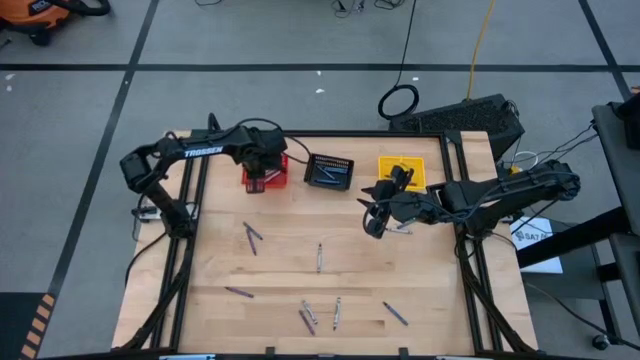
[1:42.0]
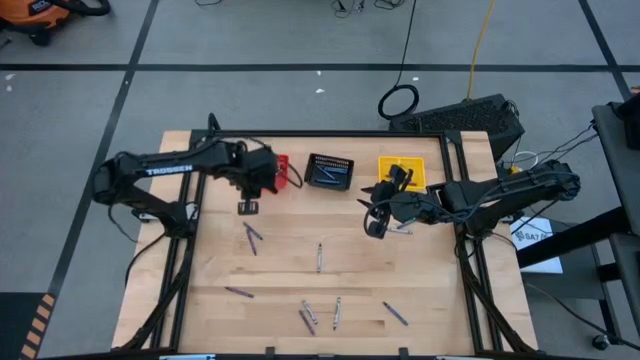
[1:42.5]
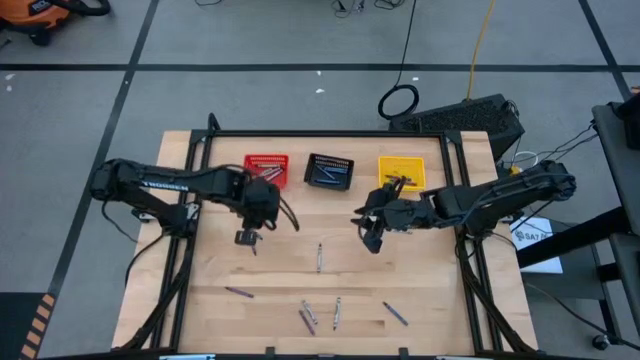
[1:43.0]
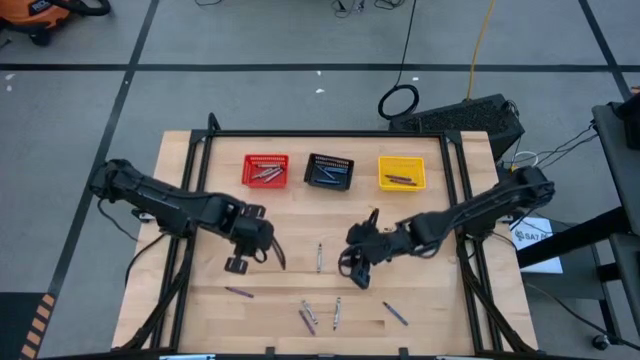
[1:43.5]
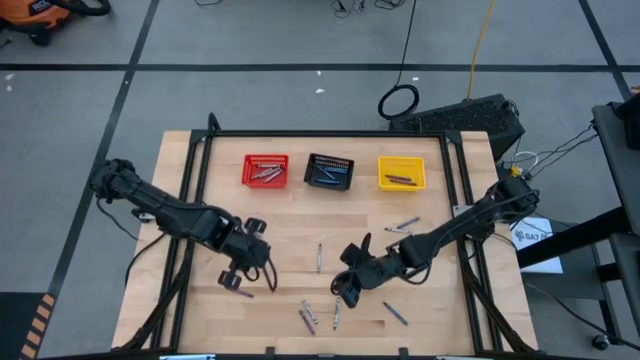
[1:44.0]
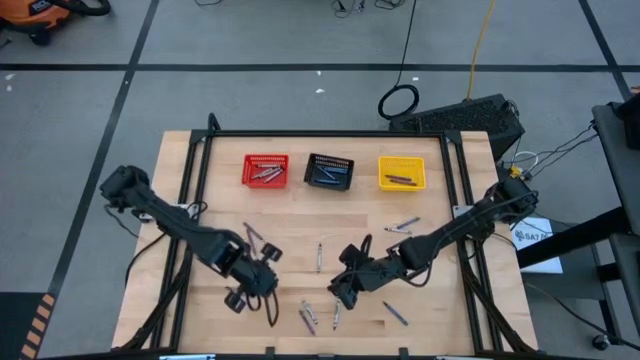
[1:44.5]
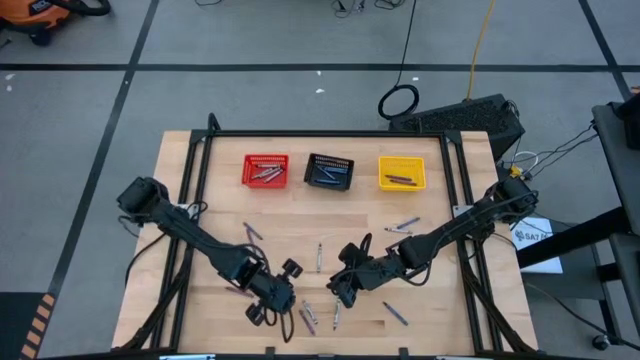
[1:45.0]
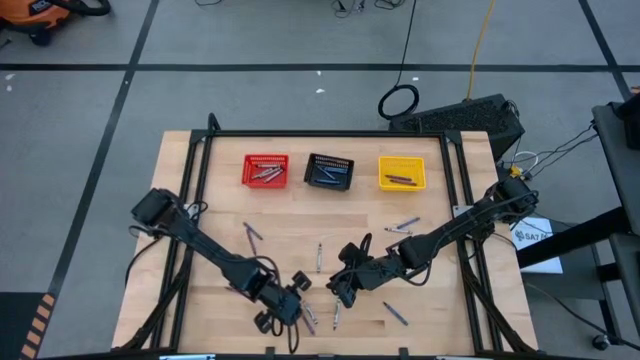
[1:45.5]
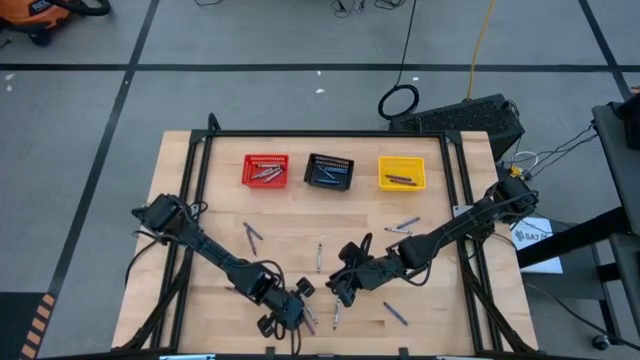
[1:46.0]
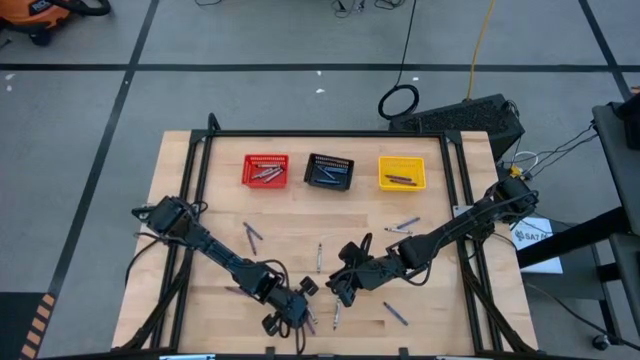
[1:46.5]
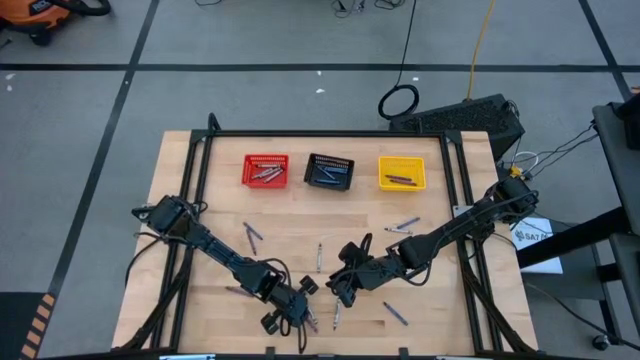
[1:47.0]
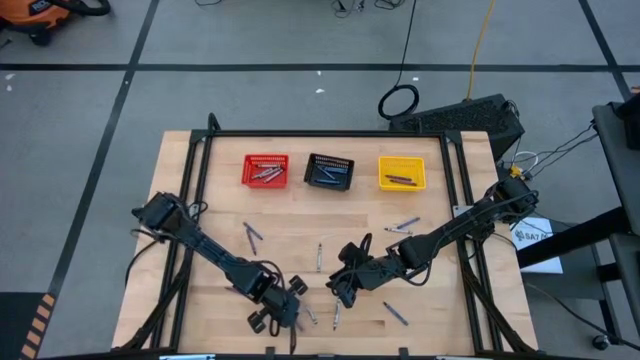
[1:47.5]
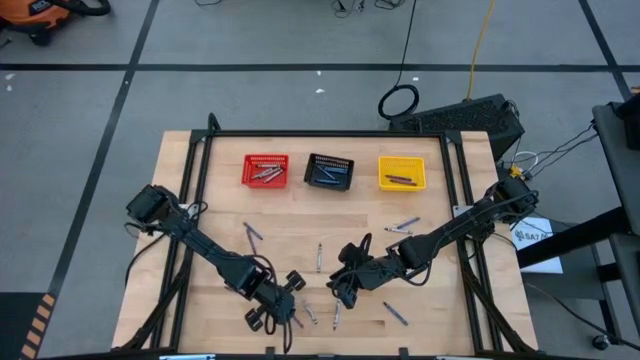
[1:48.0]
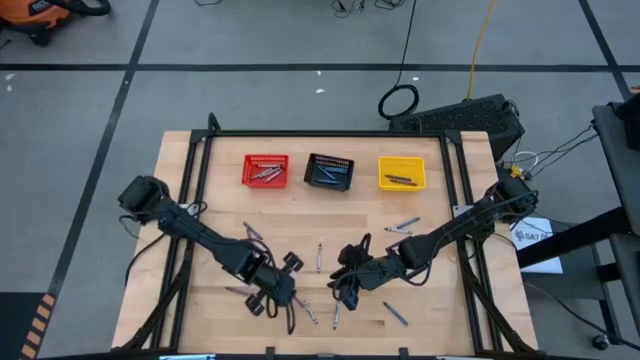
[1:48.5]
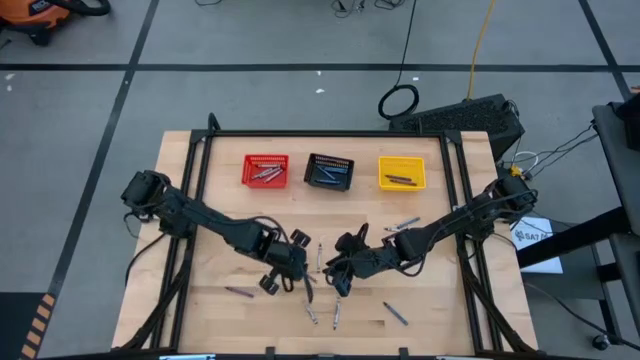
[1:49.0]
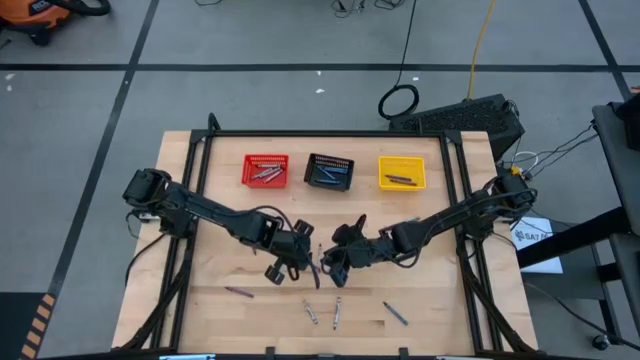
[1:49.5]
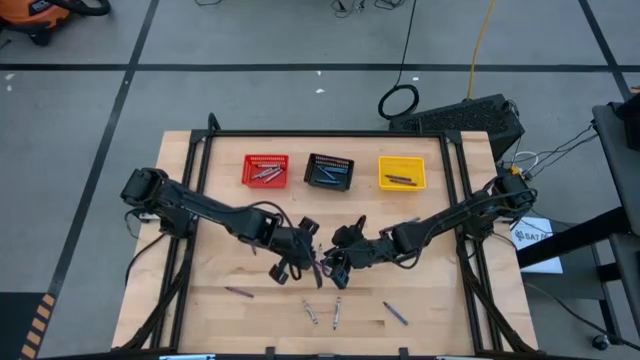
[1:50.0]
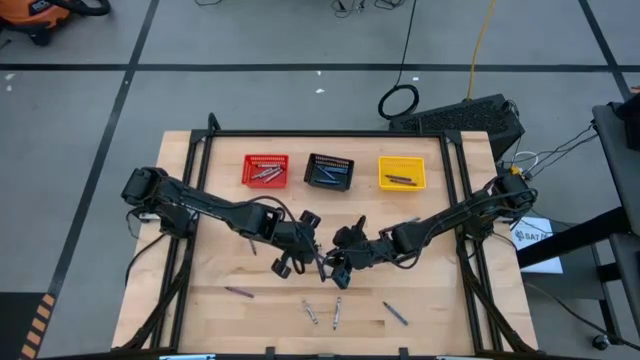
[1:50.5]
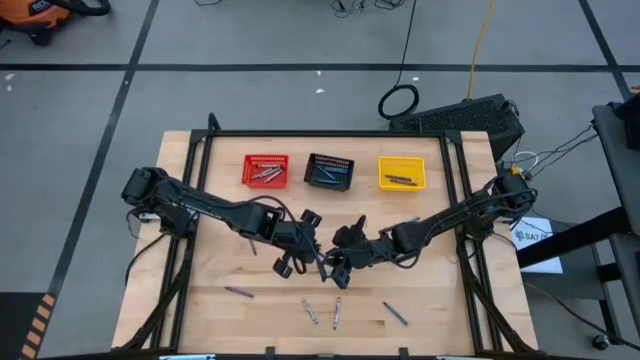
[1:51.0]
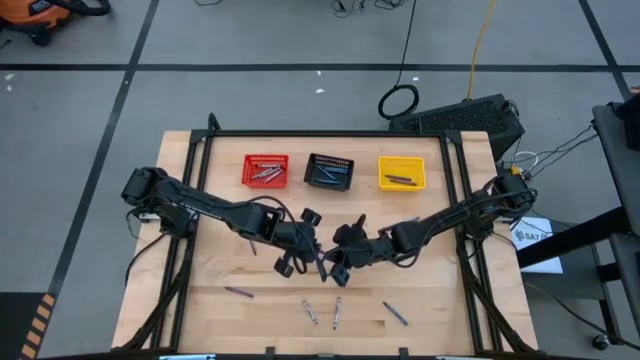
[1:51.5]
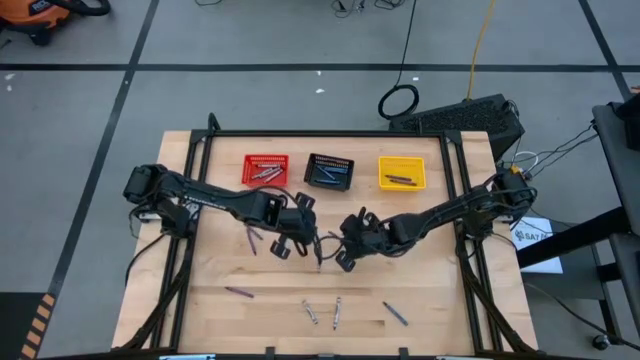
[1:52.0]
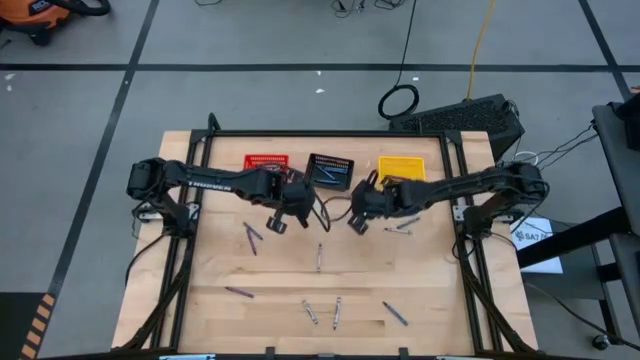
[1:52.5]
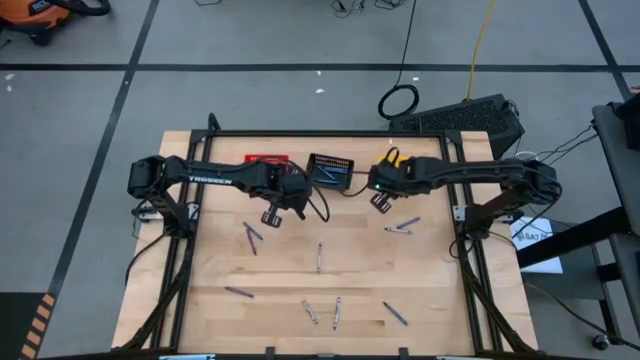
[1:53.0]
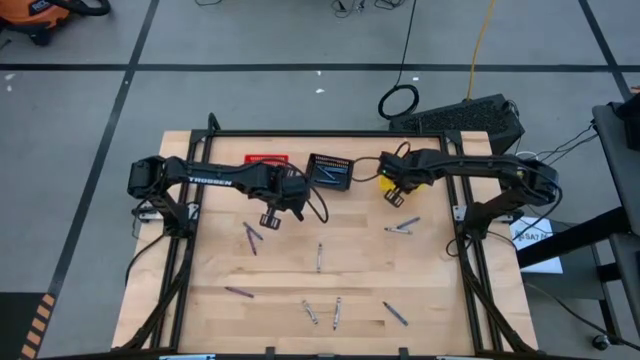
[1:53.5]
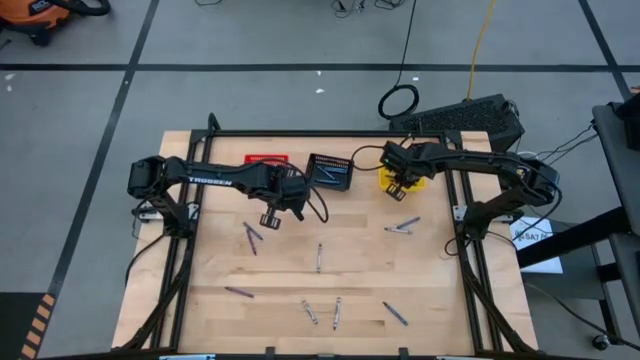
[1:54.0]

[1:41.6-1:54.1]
Task: Sort crayons
Put the violet crayon into the yellow bin

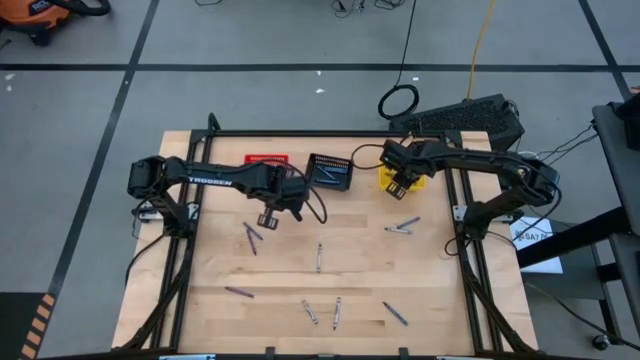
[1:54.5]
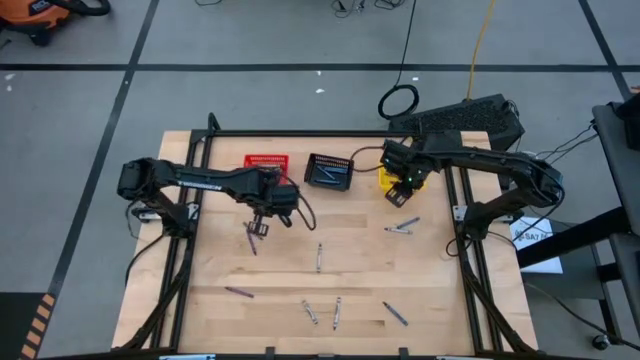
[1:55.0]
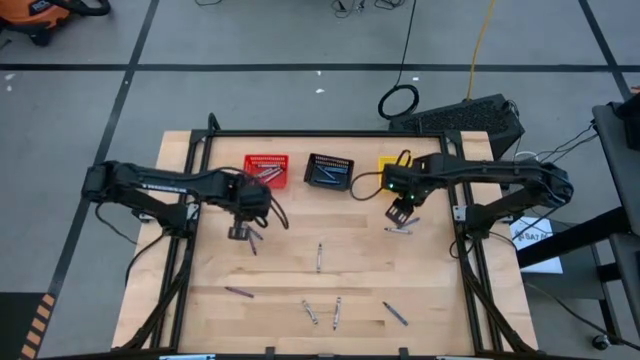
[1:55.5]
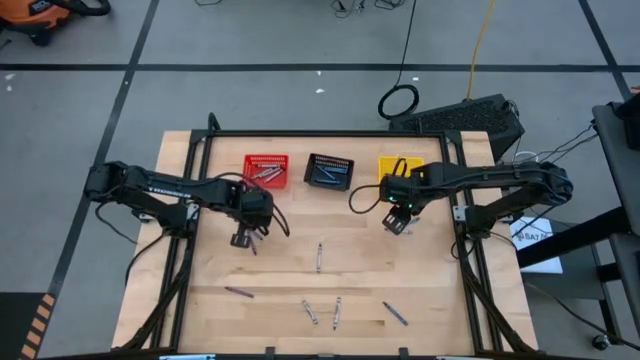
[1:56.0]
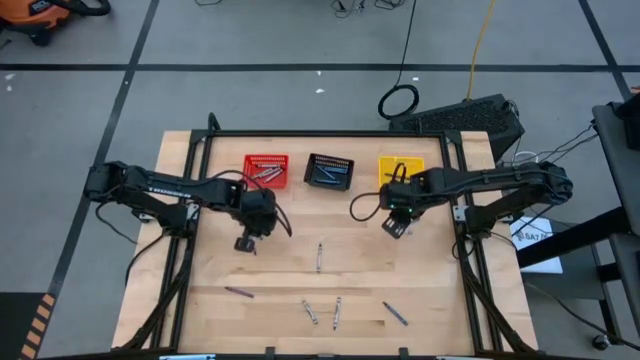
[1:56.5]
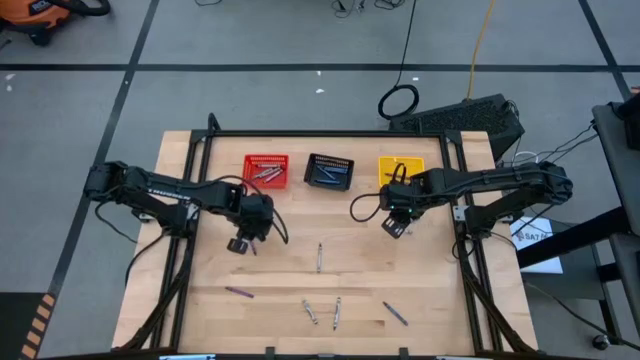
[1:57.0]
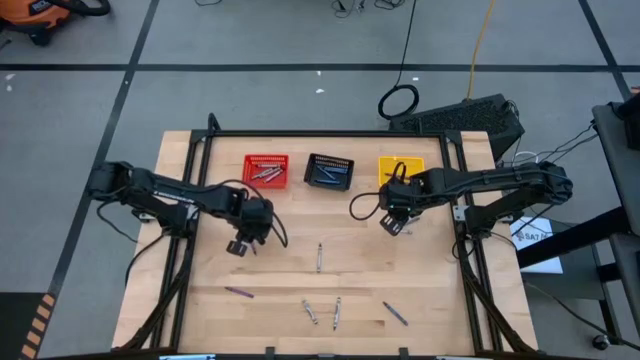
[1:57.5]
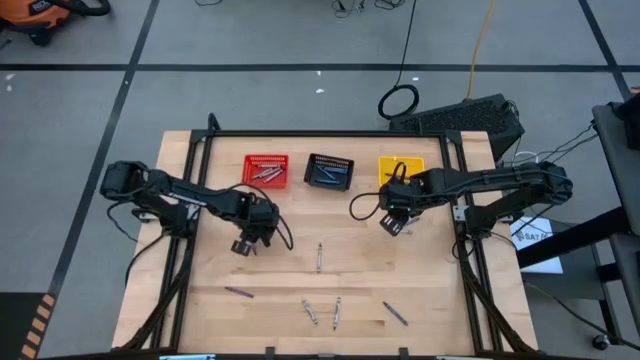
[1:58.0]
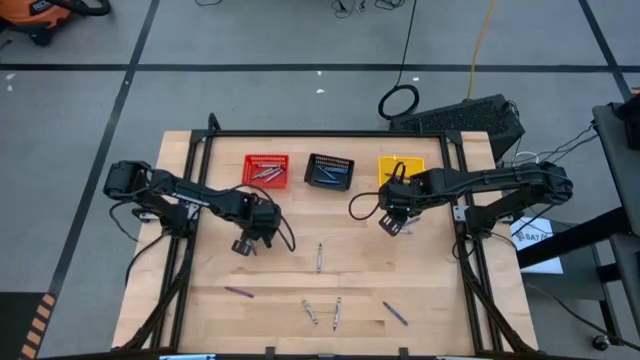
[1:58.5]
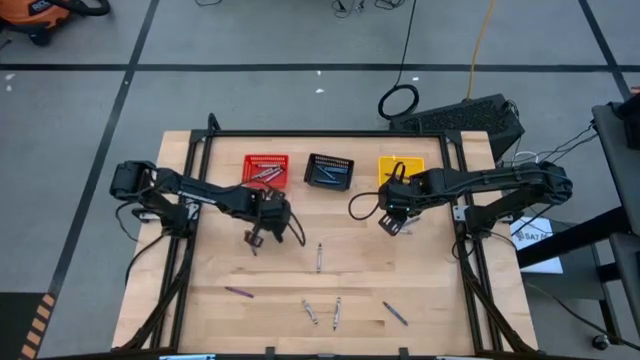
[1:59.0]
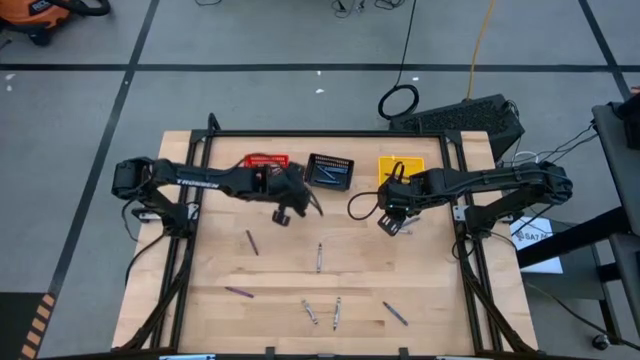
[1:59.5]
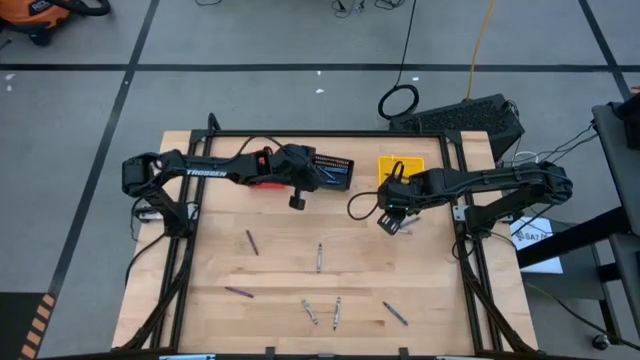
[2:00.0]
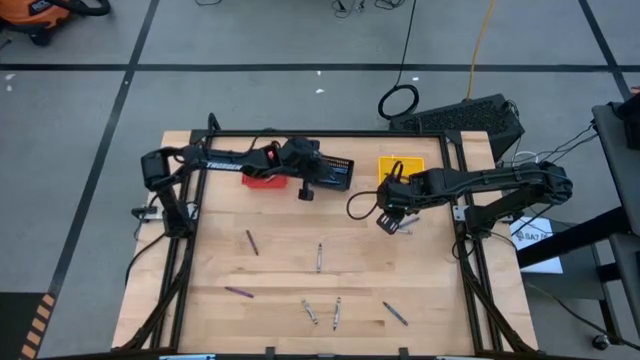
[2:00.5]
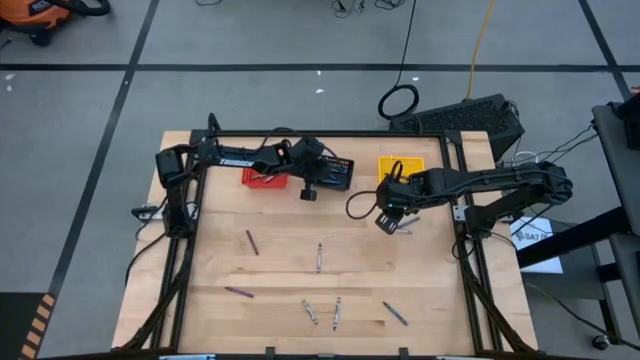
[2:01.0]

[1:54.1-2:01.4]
Put the blue crayon into the black bin

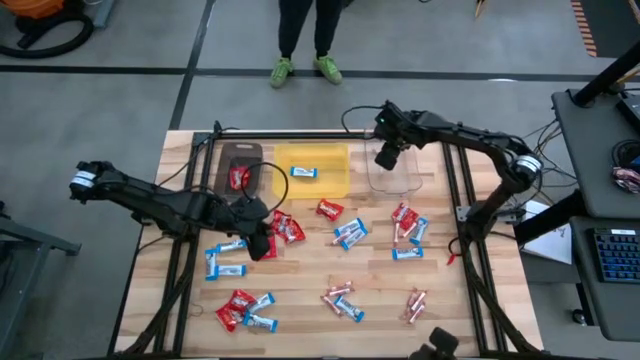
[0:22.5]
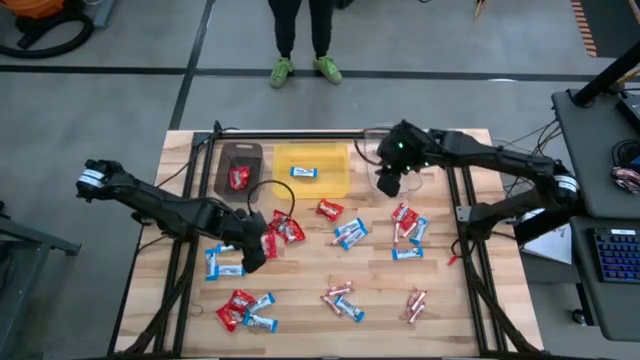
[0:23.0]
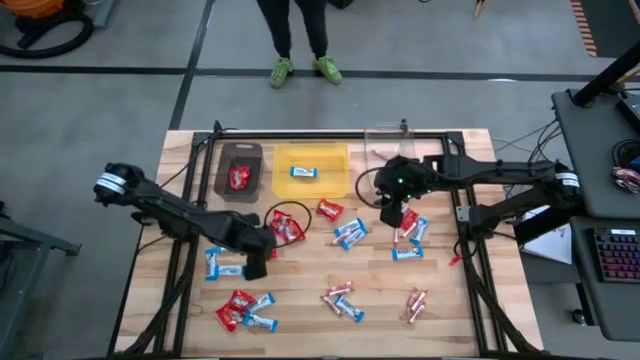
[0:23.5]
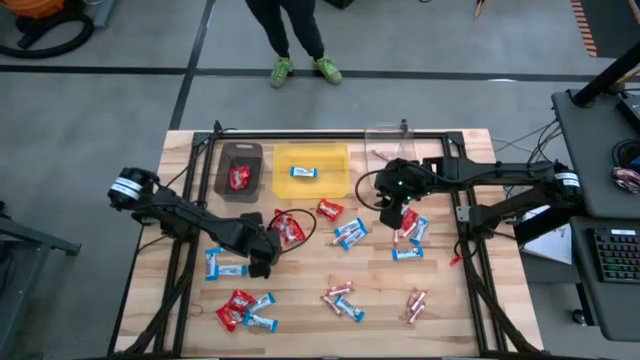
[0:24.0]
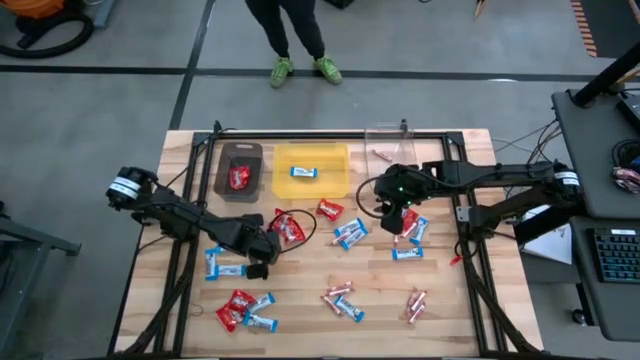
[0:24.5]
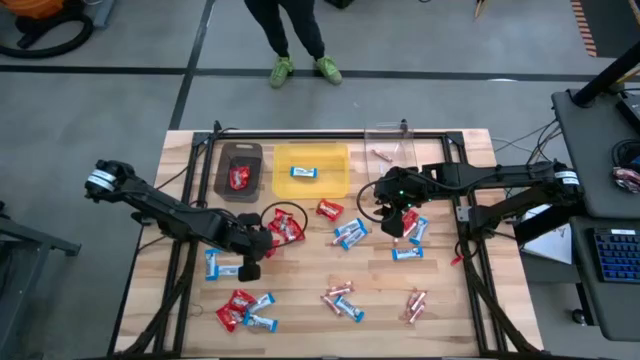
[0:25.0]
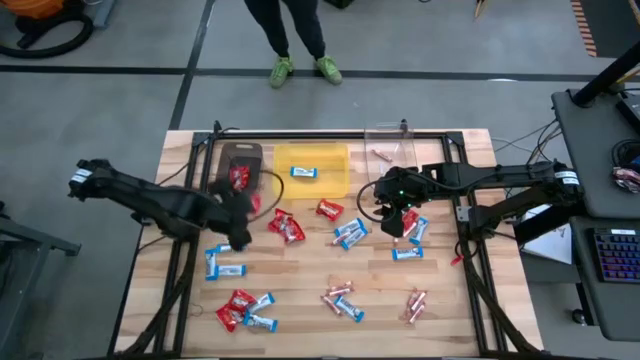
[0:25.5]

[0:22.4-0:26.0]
Task: Sort candy
Put the red candy into the black bin
